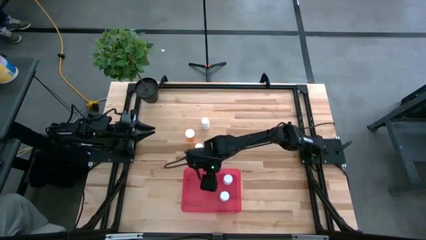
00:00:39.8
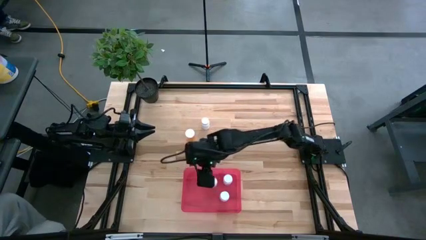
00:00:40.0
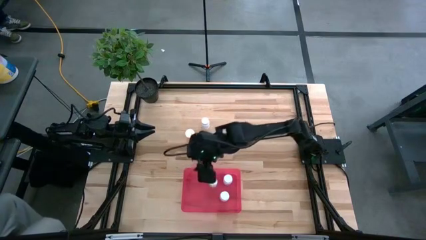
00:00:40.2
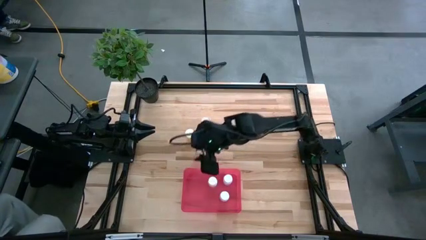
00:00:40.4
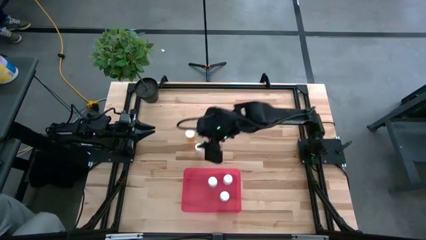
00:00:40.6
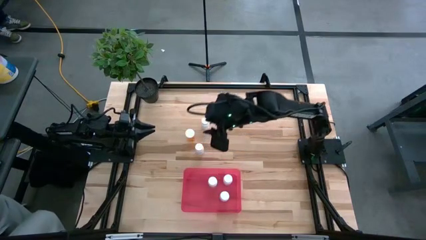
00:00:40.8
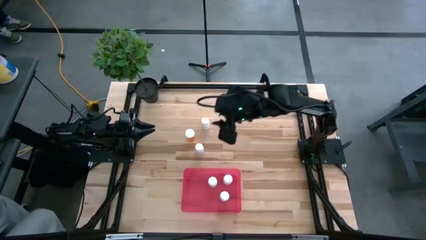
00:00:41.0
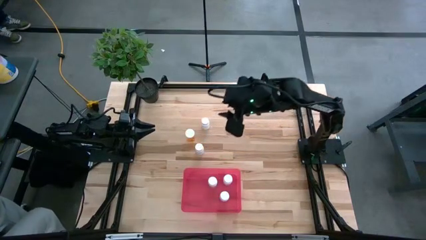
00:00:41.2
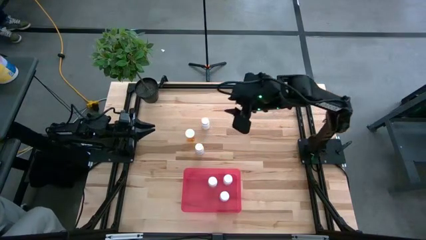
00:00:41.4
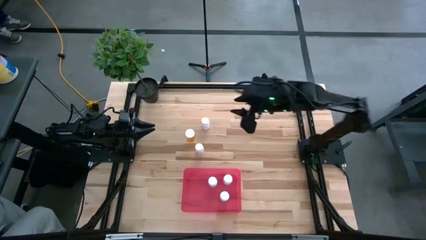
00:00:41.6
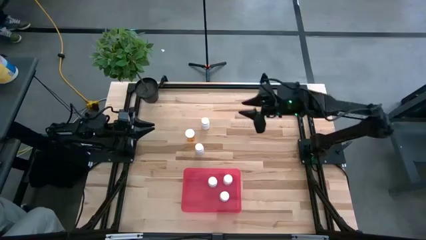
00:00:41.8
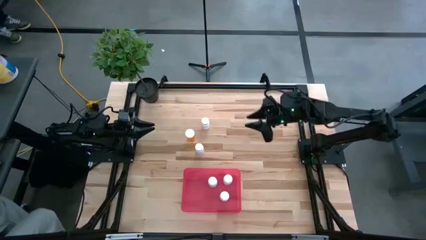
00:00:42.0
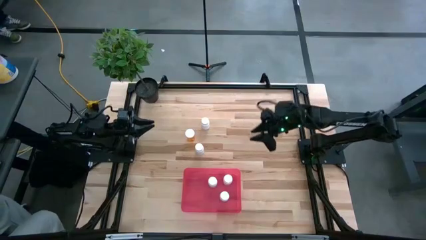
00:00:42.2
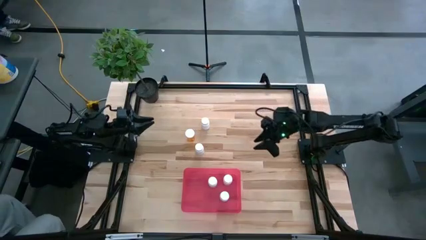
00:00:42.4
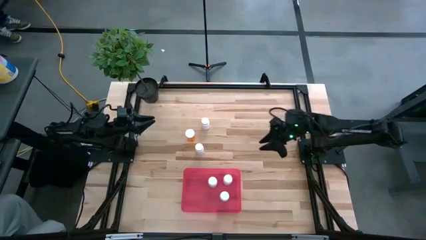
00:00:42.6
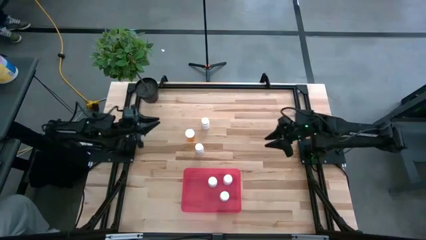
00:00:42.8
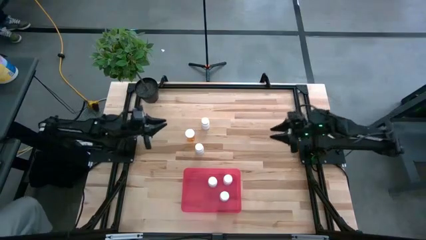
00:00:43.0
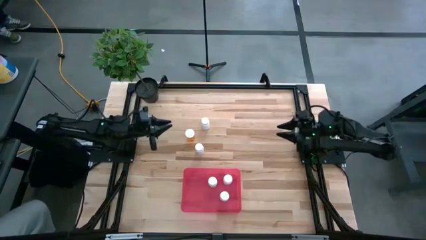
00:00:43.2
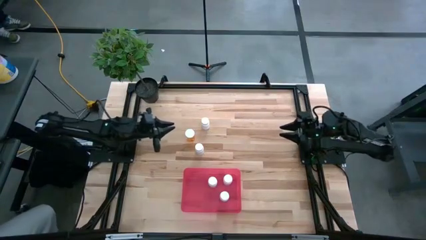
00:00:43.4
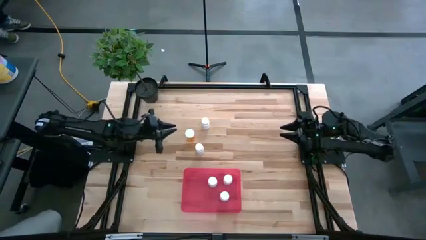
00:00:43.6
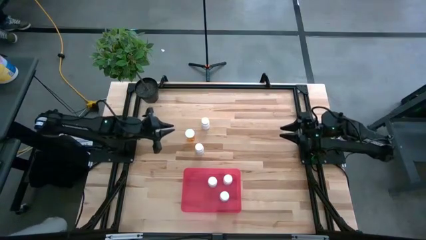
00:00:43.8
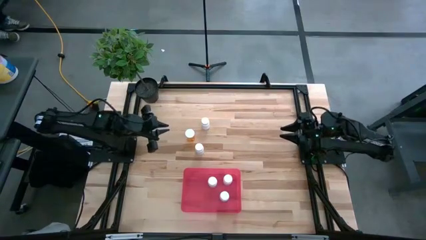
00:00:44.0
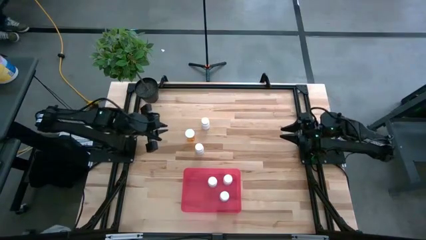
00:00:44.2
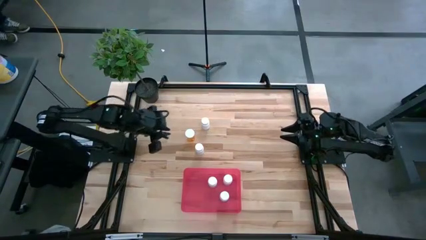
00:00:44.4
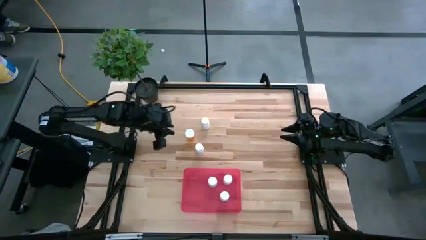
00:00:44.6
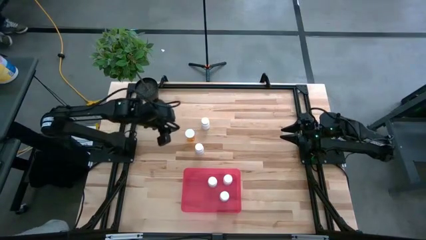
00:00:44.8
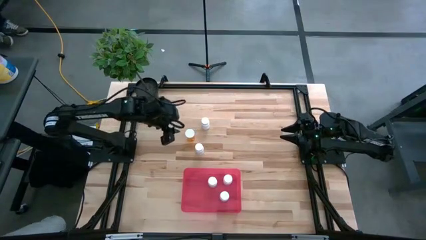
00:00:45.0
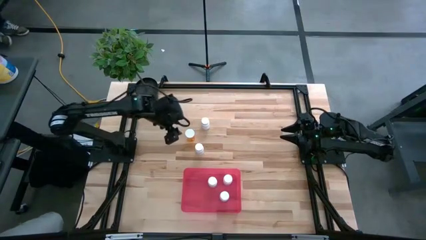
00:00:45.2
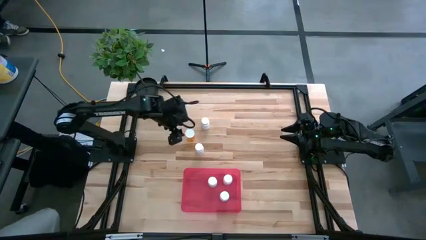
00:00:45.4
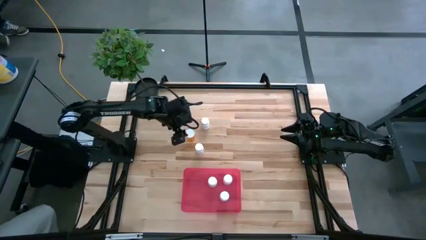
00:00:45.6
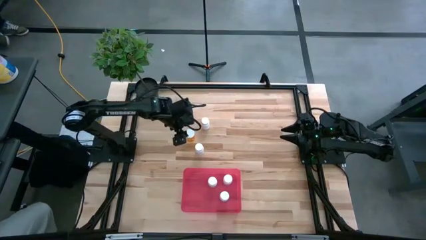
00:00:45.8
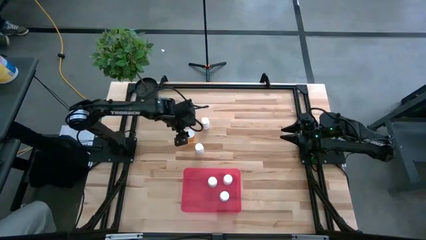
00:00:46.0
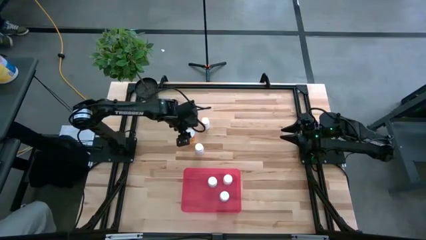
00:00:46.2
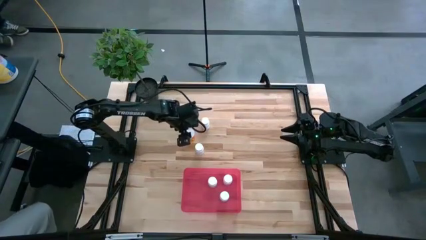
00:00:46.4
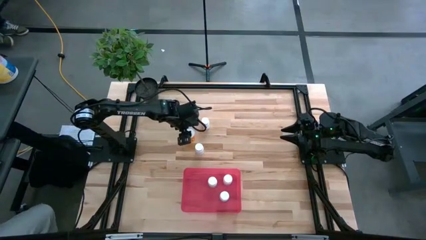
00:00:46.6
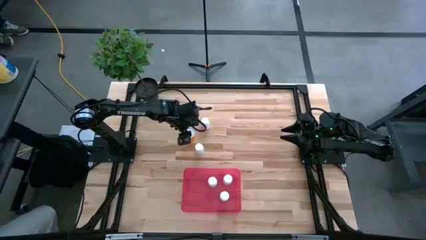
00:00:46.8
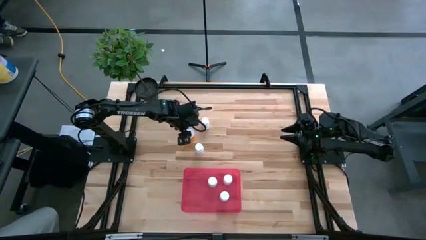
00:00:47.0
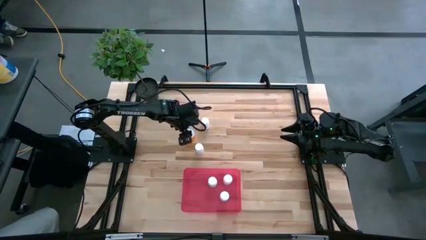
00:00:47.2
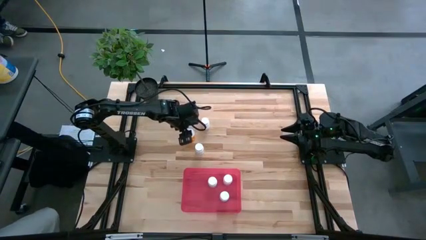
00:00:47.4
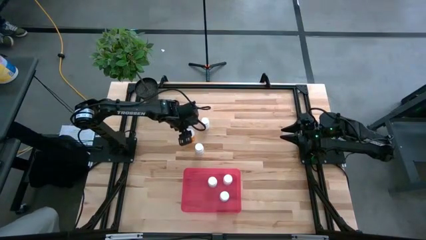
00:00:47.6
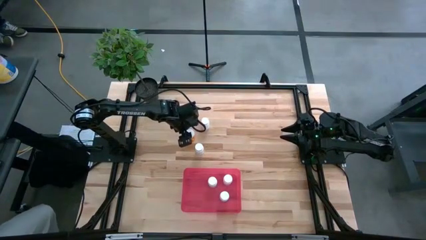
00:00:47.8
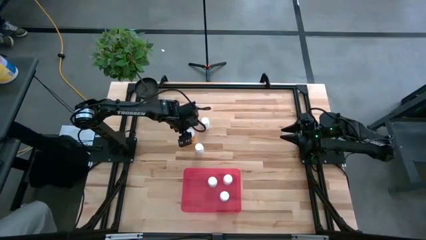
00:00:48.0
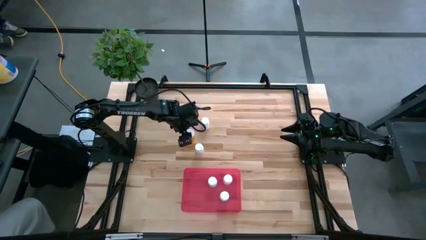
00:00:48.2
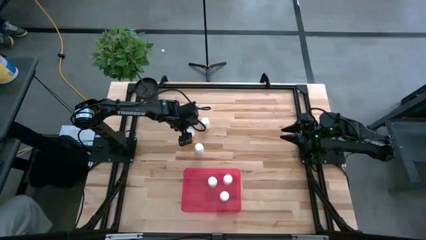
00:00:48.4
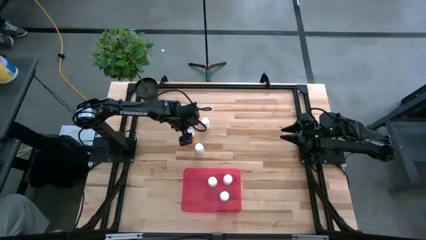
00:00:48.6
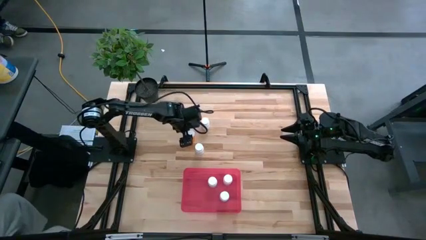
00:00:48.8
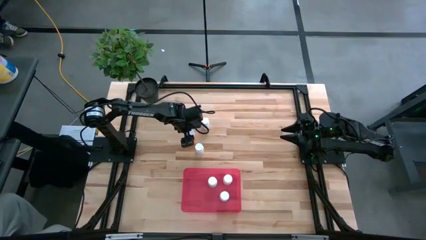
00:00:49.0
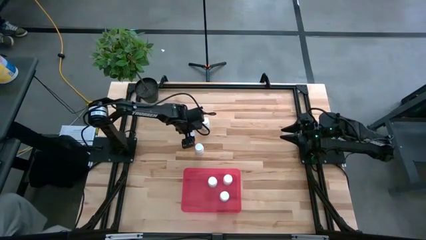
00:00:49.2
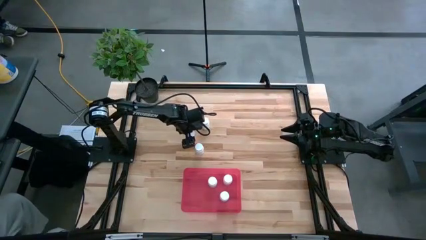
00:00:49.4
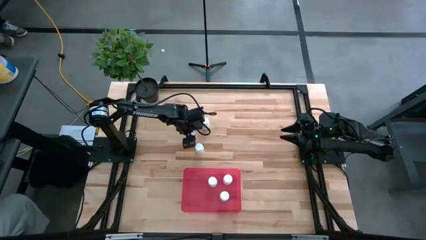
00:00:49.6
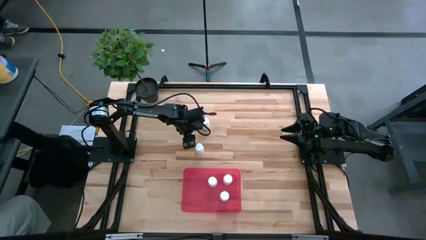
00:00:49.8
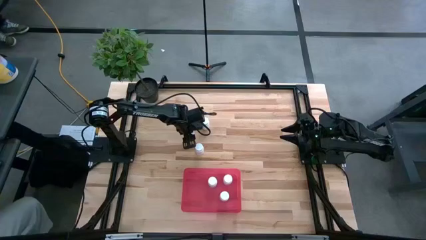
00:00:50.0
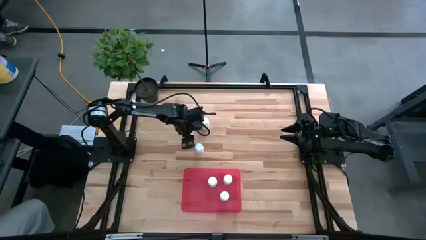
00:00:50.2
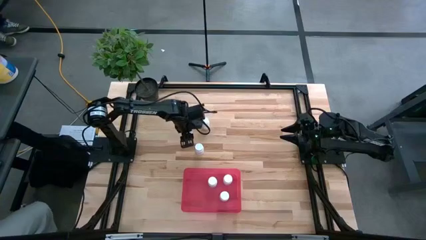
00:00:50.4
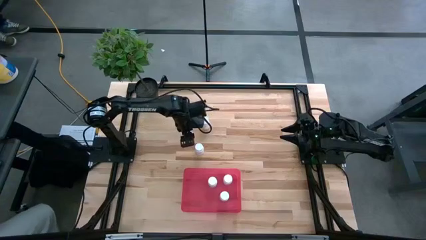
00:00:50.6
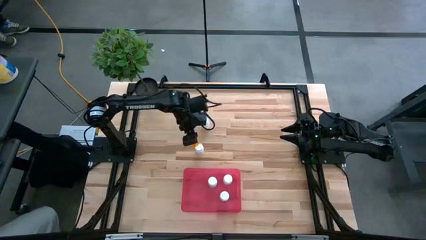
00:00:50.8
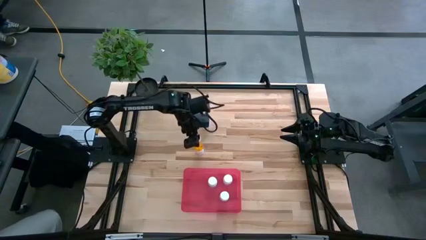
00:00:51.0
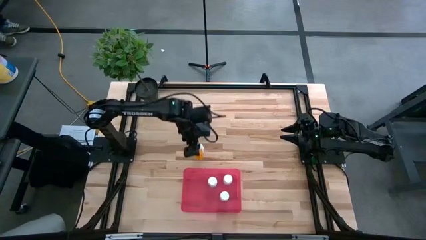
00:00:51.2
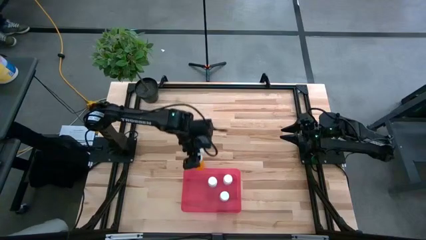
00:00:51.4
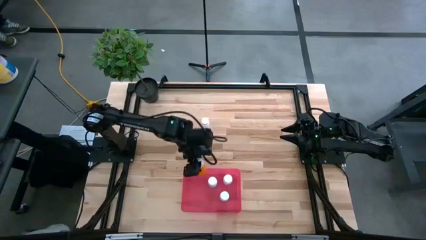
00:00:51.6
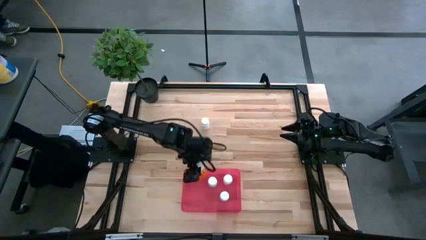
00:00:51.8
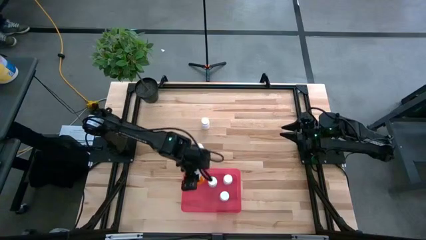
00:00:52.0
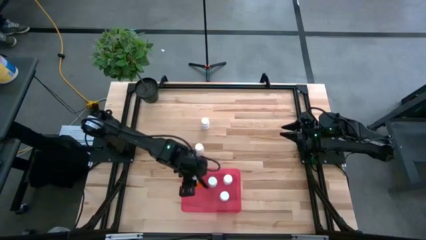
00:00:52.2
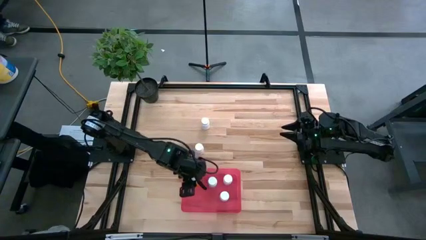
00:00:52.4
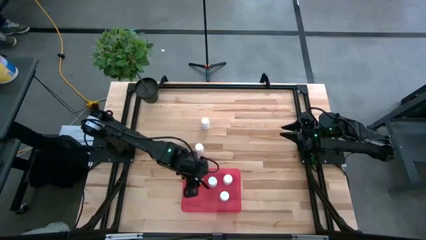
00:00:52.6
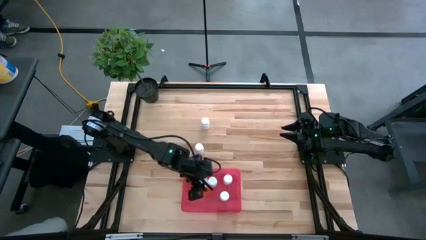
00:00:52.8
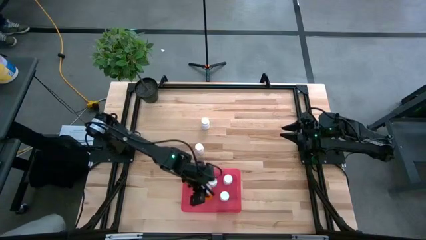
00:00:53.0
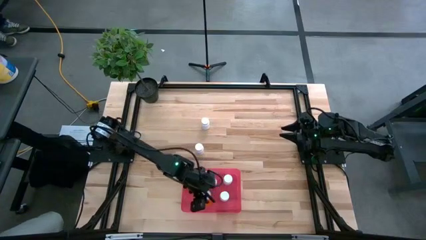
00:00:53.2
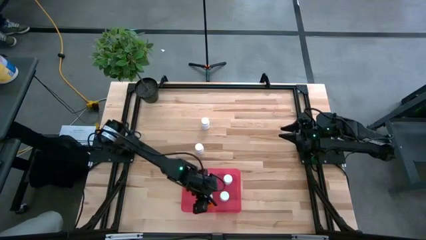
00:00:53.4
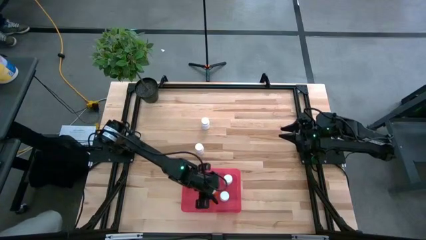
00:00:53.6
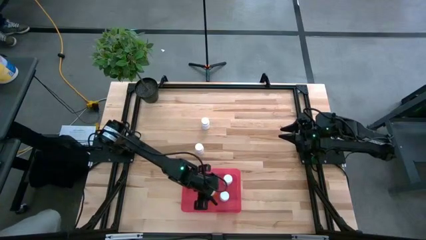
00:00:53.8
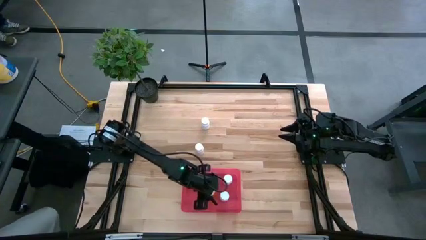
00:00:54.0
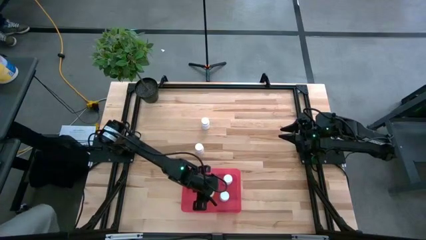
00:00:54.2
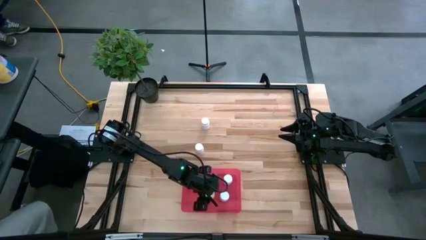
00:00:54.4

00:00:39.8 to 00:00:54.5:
Task: Pick and place pill bottles into a basket
Put the orange pill bottle into the bin
